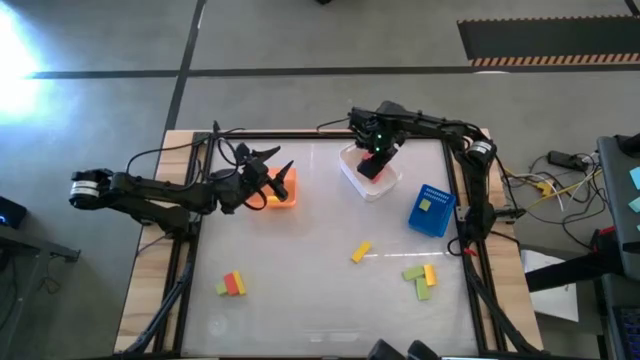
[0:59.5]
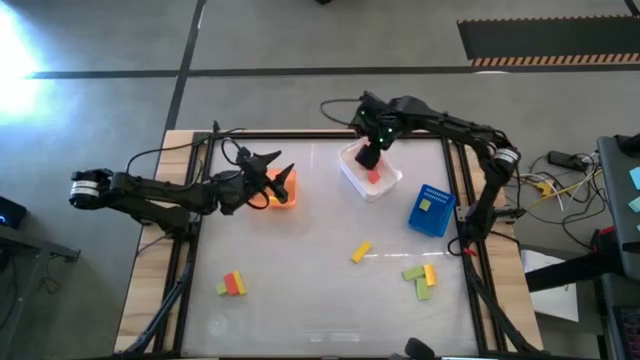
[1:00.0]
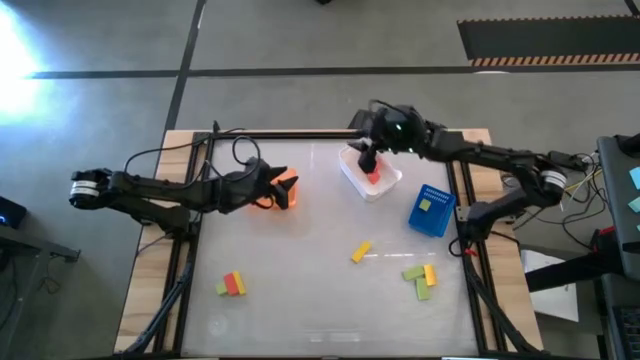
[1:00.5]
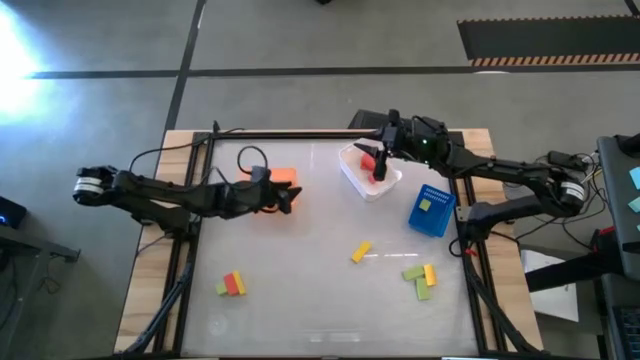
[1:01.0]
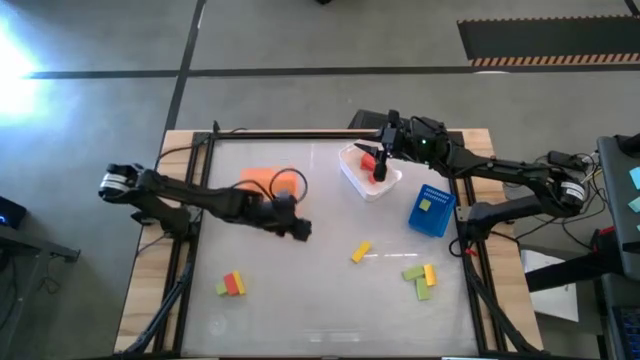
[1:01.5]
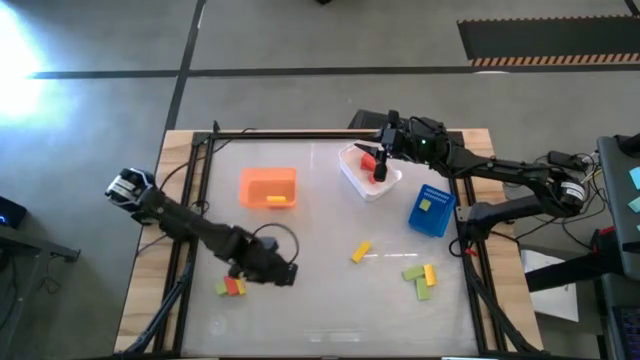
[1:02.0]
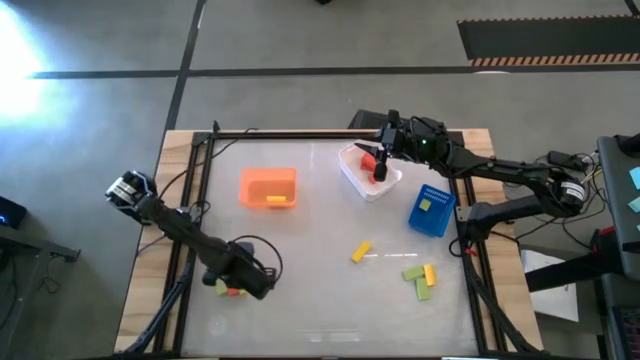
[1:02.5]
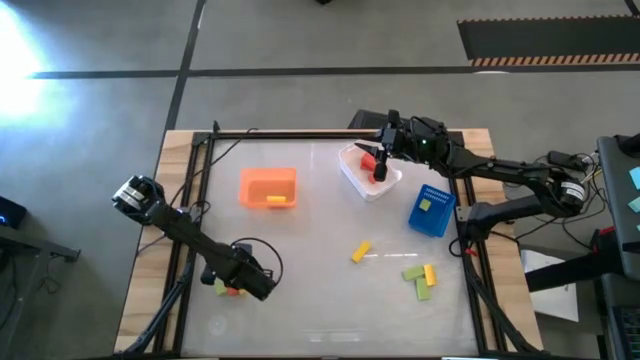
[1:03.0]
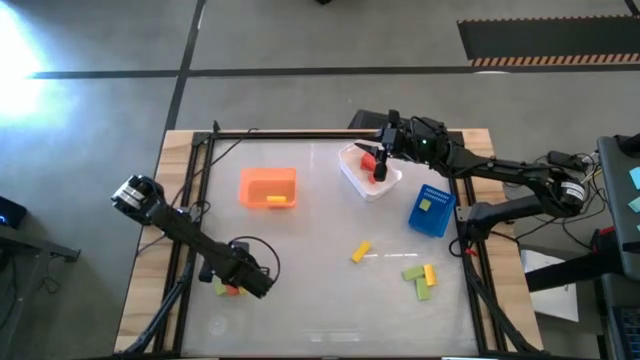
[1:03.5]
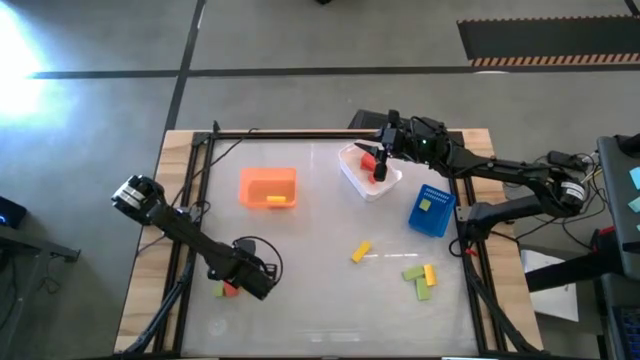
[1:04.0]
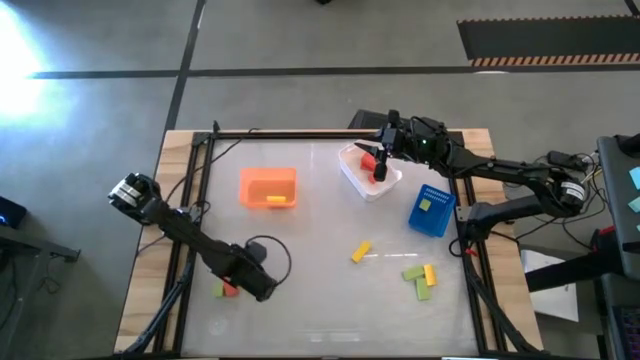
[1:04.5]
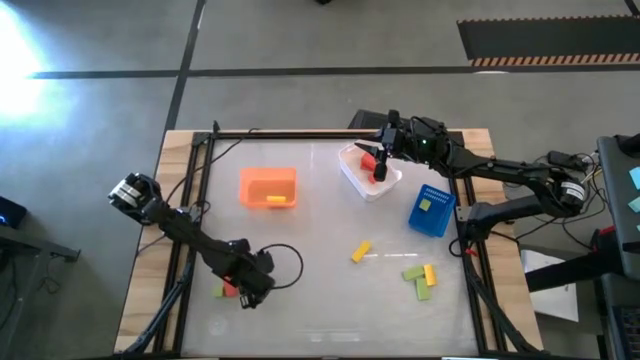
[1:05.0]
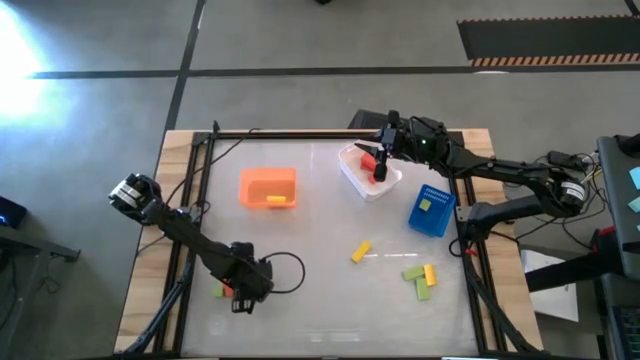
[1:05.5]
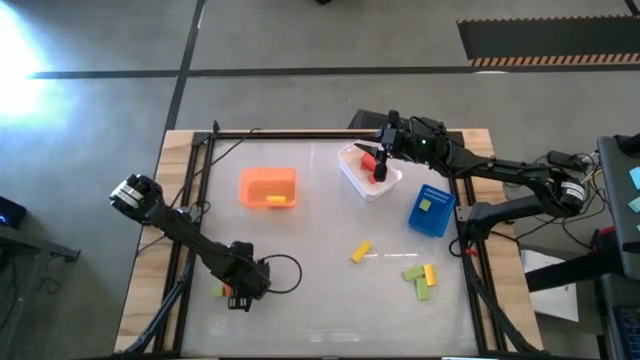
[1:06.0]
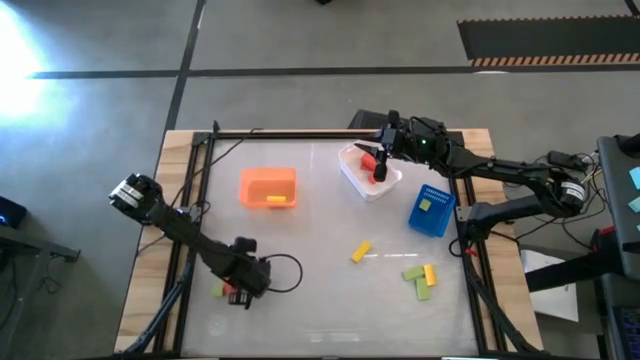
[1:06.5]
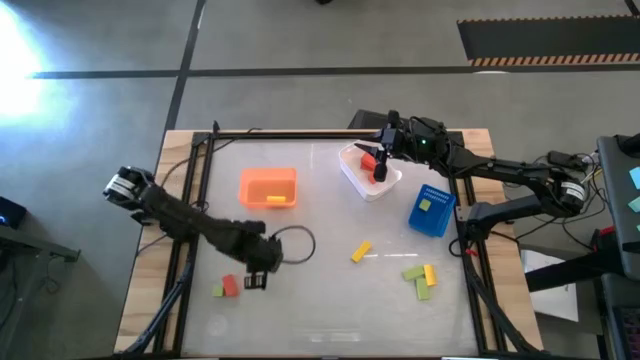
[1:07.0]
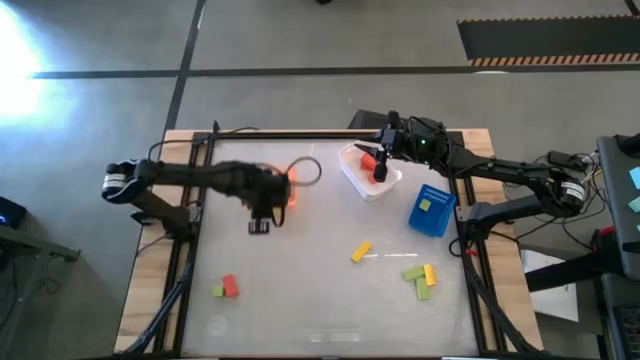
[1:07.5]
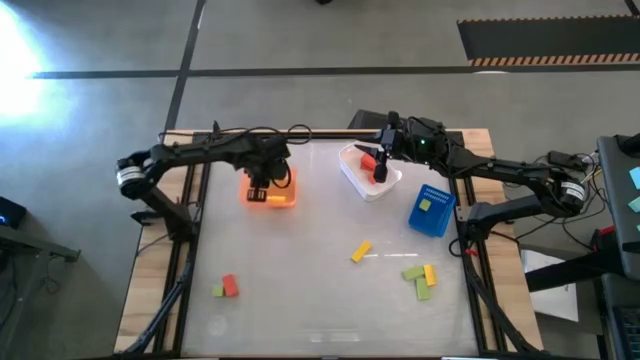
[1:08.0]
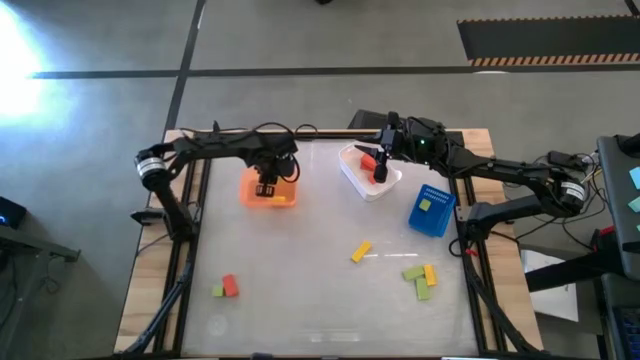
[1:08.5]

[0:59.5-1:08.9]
Task: Sort & place blocks by color
Put the yellow block into the orange bin

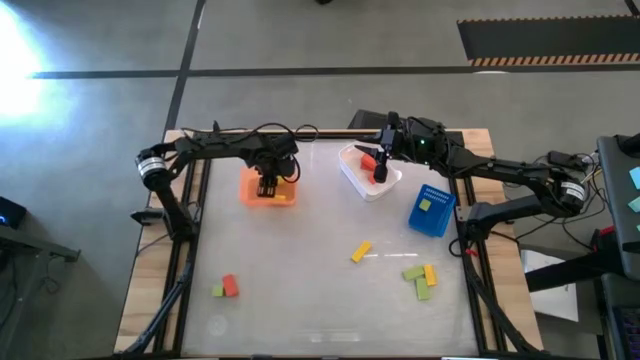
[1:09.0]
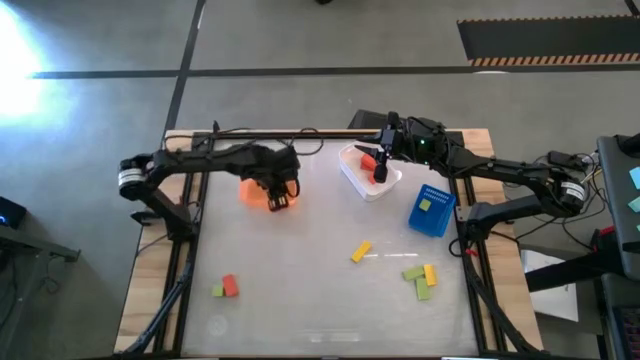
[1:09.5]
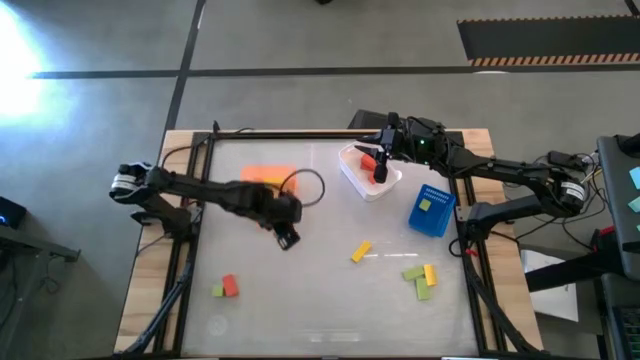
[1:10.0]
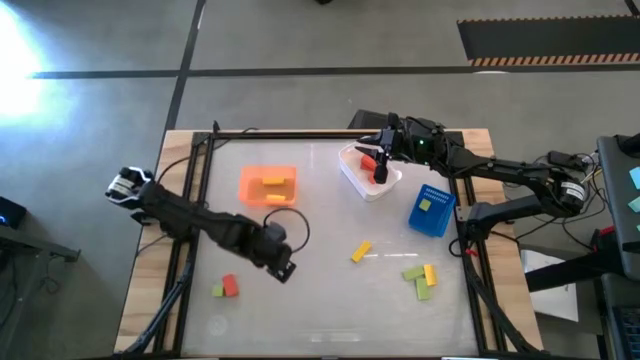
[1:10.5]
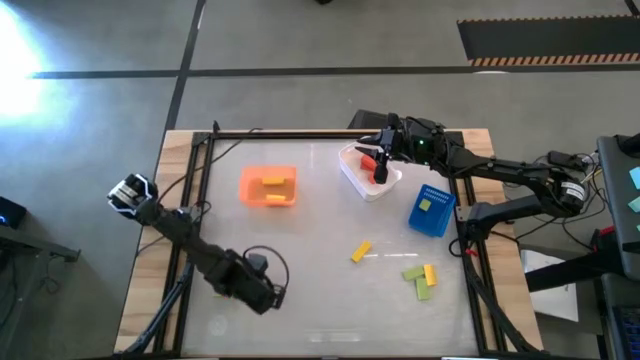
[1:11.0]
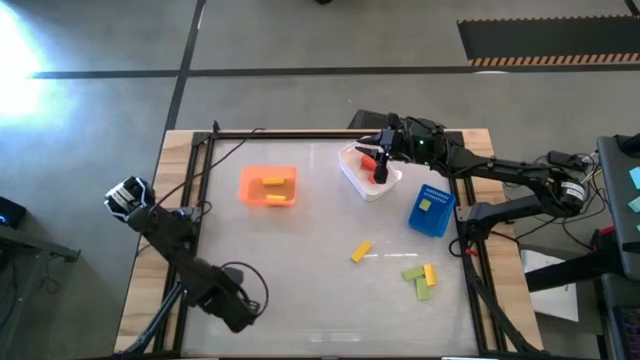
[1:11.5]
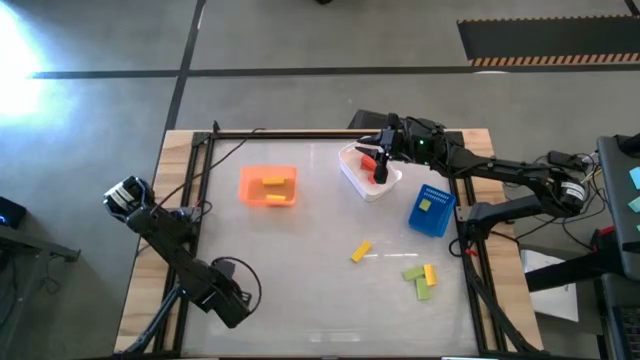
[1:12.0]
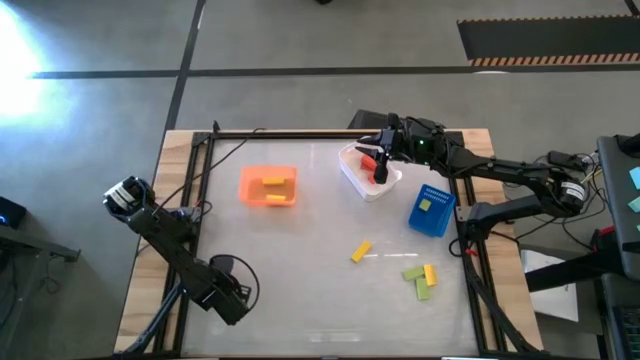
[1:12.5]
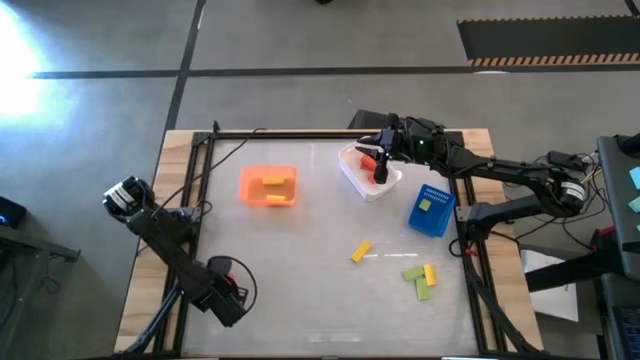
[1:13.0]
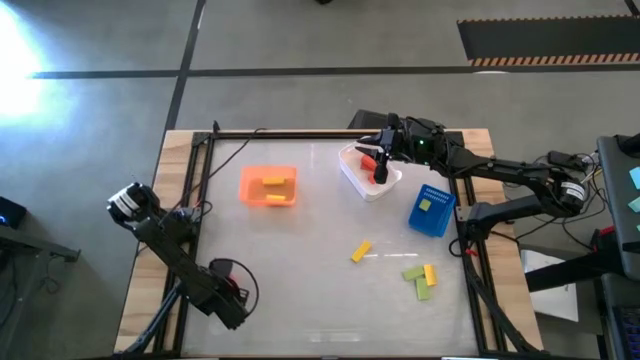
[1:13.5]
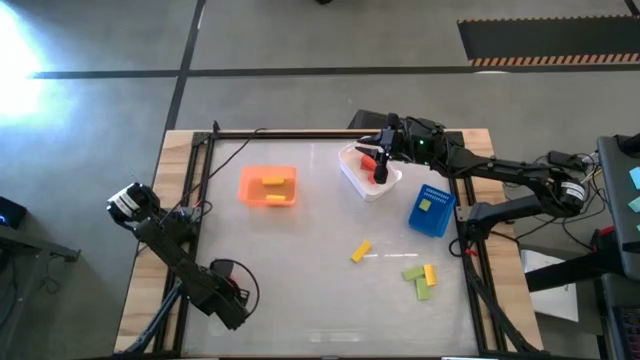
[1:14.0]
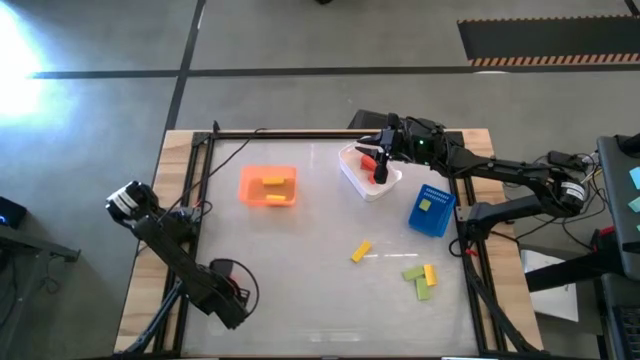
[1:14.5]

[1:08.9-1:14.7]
Put the green block into the blue bin

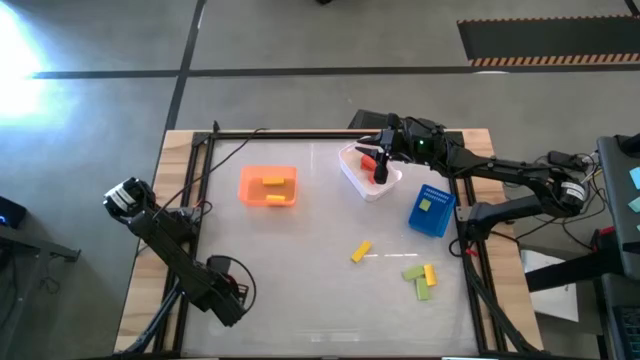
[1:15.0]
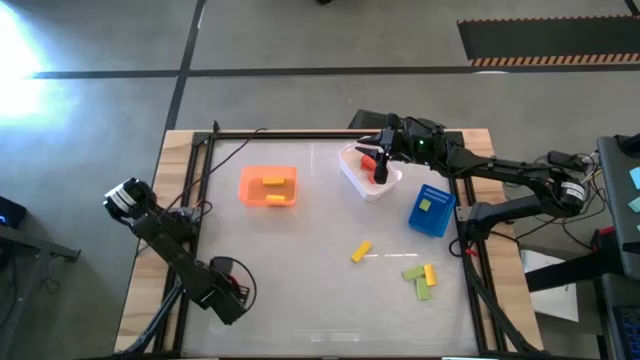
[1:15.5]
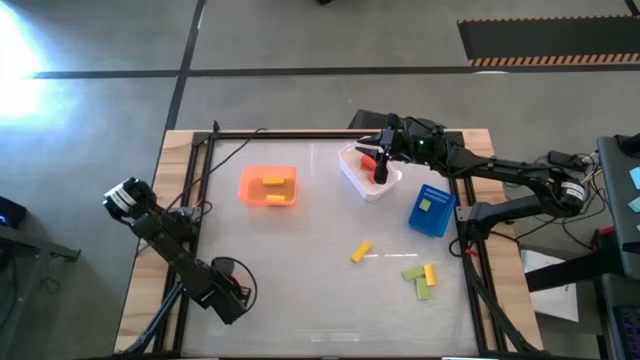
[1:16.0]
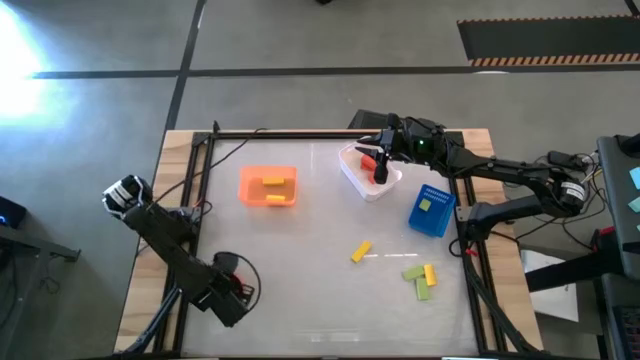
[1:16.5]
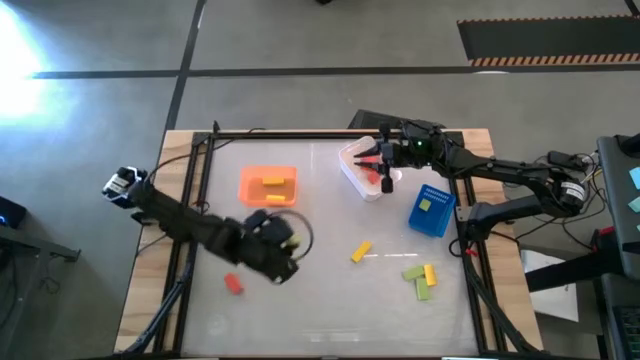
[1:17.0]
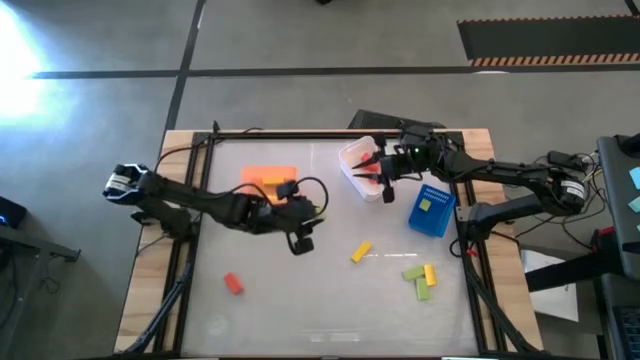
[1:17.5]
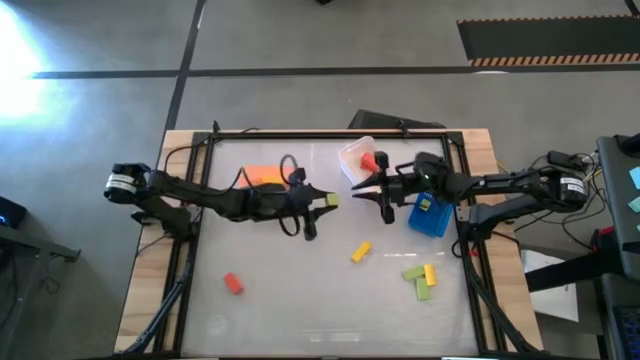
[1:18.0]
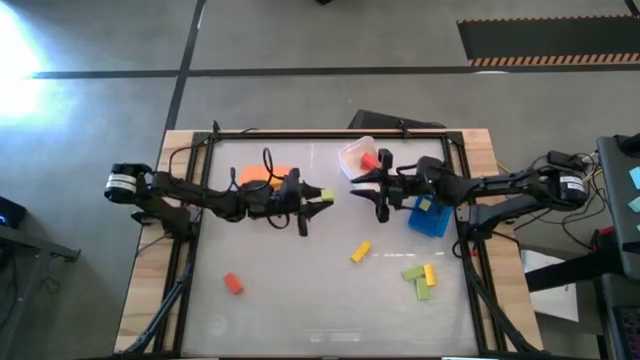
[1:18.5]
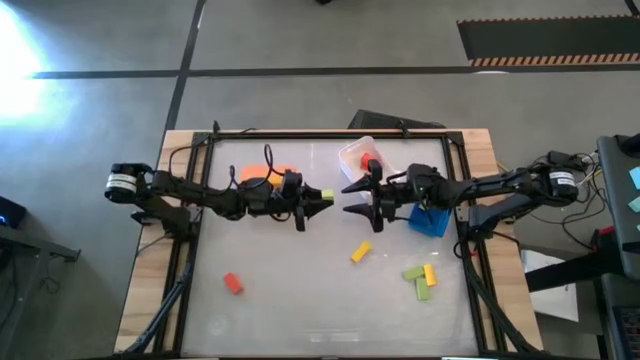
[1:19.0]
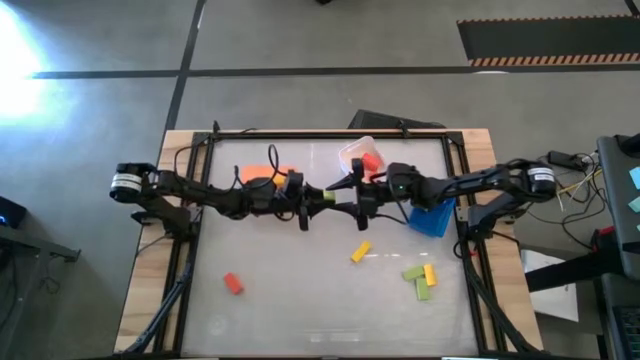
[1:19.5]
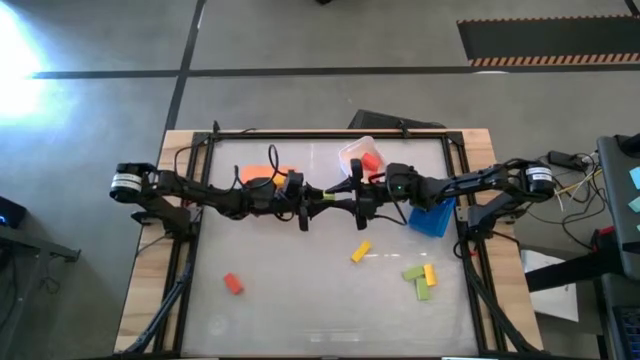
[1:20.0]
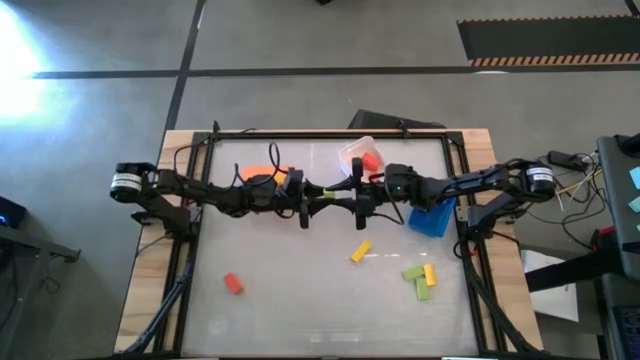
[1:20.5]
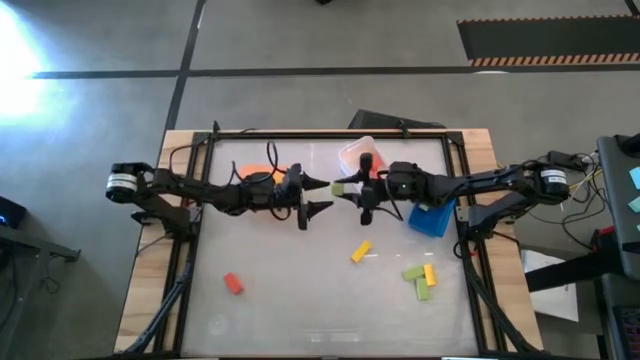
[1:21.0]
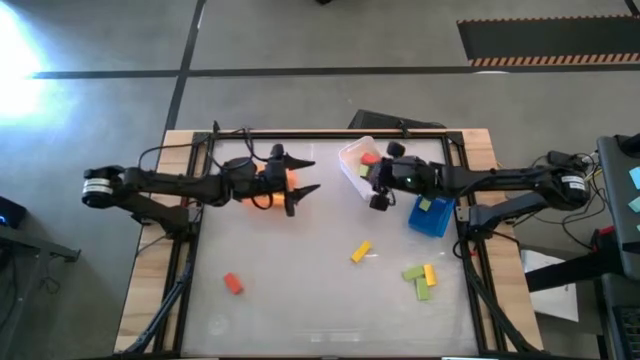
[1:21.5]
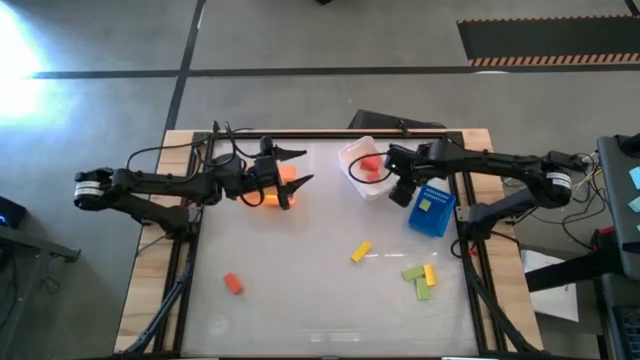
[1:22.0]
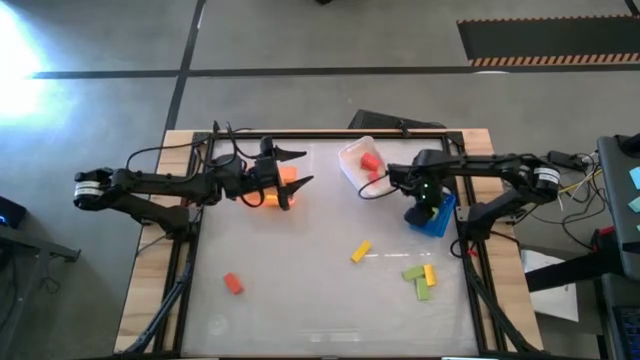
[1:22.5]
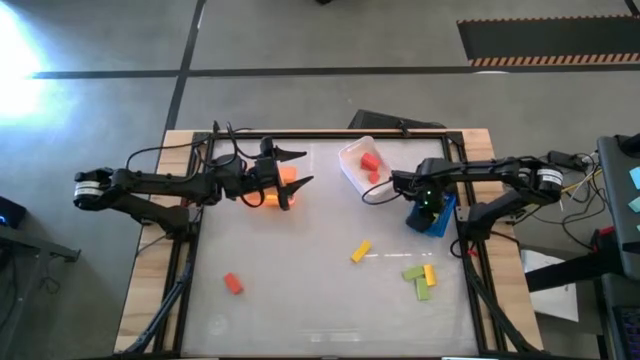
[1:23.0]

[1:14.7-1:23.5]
Put the green block into the blue bin
